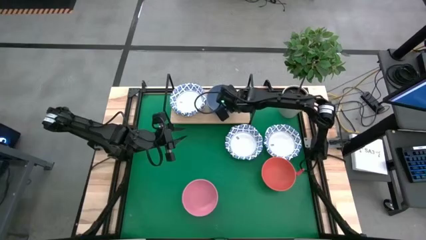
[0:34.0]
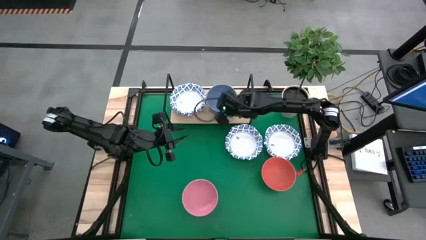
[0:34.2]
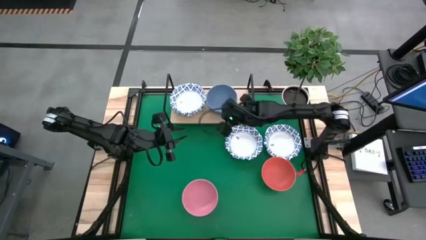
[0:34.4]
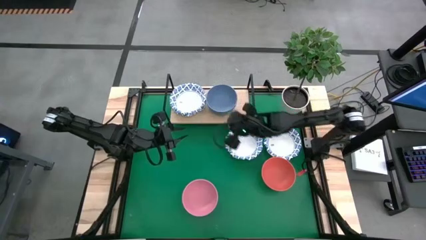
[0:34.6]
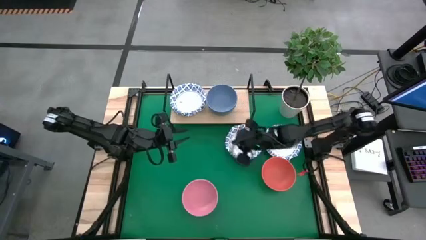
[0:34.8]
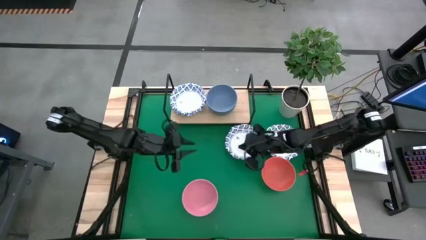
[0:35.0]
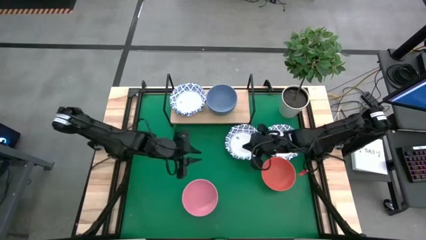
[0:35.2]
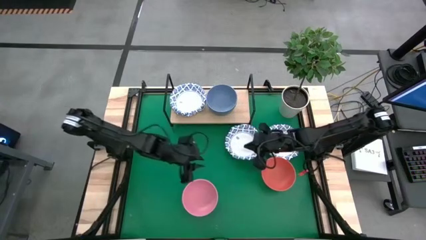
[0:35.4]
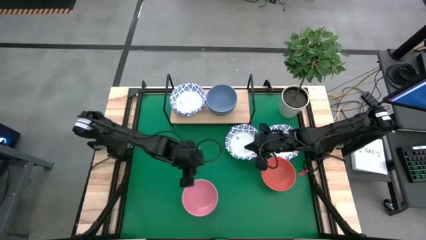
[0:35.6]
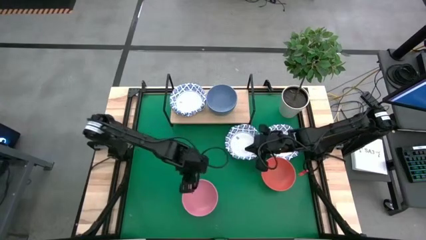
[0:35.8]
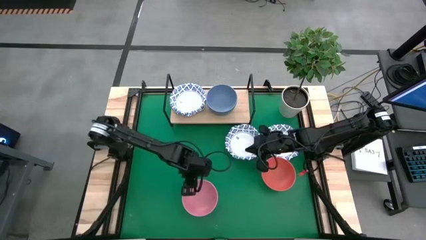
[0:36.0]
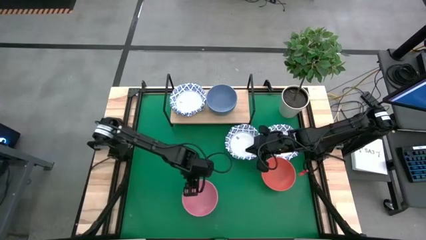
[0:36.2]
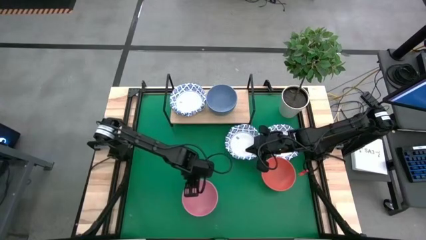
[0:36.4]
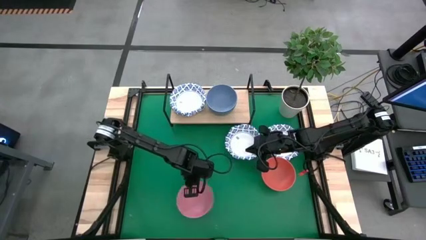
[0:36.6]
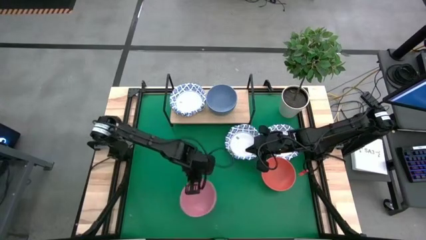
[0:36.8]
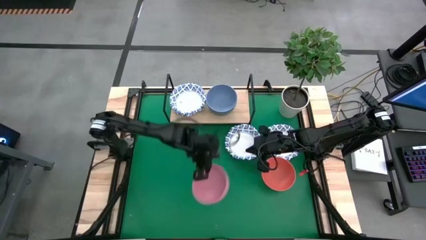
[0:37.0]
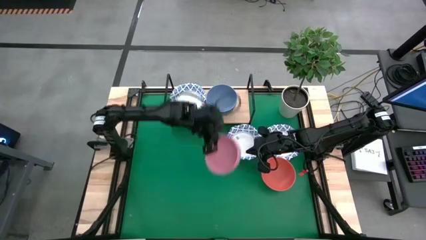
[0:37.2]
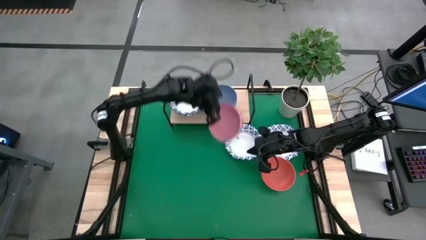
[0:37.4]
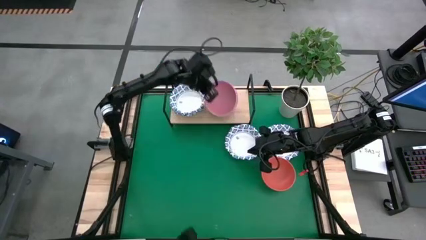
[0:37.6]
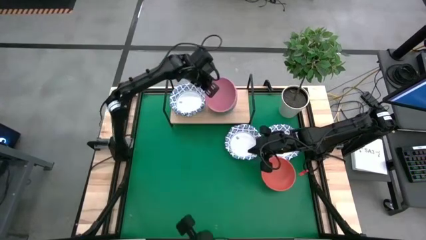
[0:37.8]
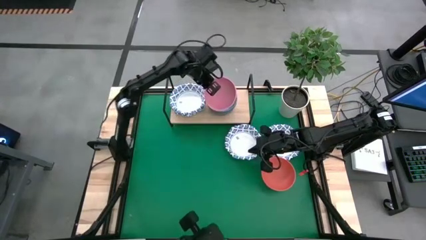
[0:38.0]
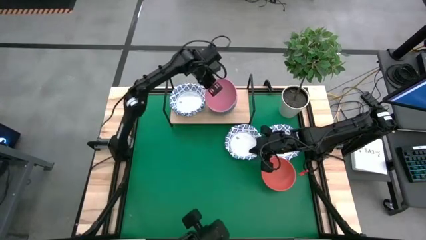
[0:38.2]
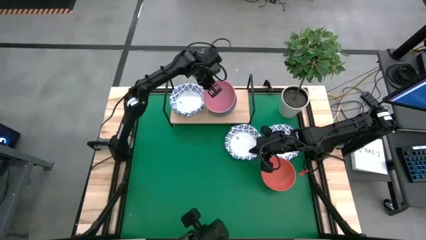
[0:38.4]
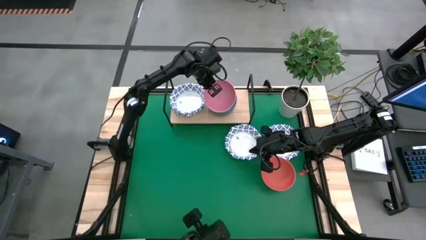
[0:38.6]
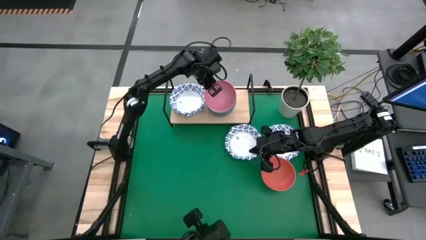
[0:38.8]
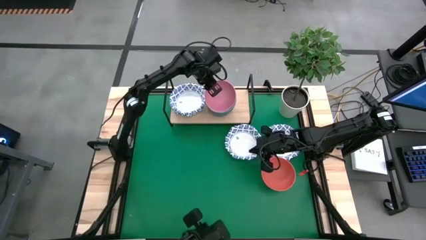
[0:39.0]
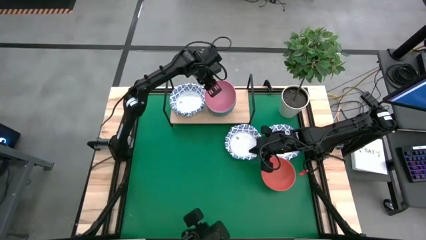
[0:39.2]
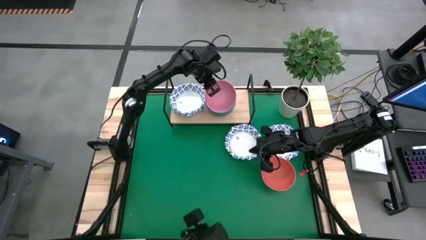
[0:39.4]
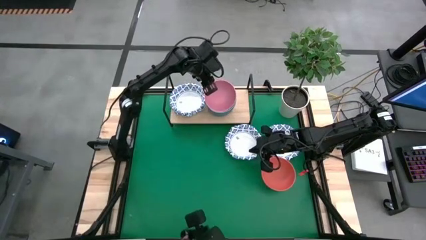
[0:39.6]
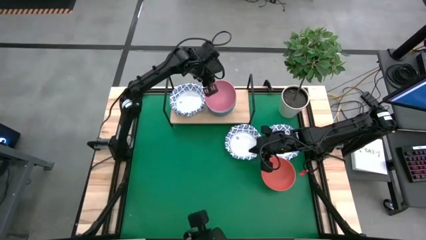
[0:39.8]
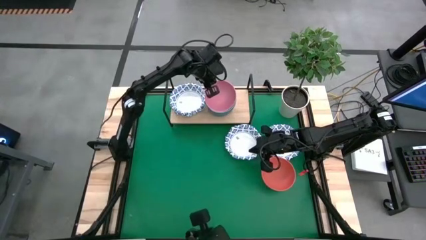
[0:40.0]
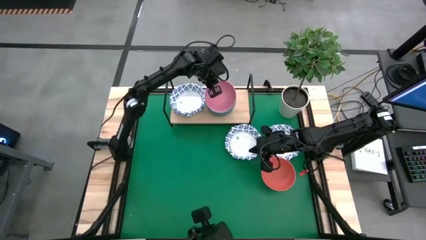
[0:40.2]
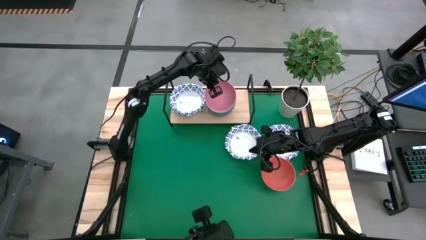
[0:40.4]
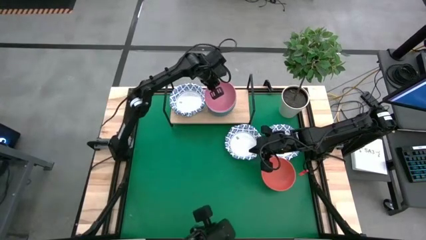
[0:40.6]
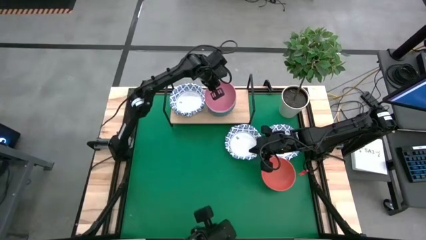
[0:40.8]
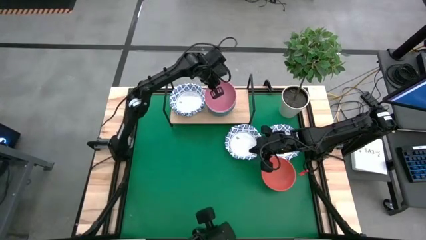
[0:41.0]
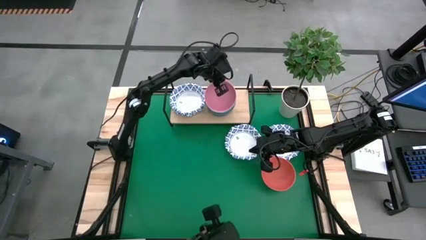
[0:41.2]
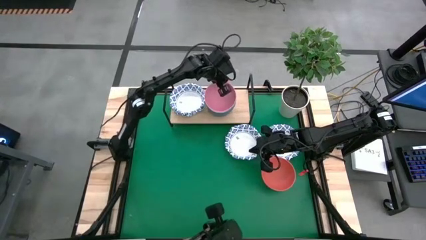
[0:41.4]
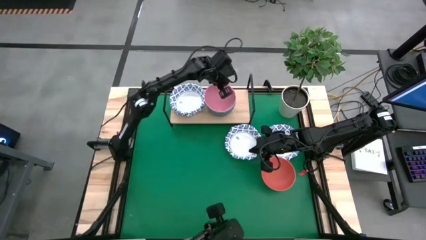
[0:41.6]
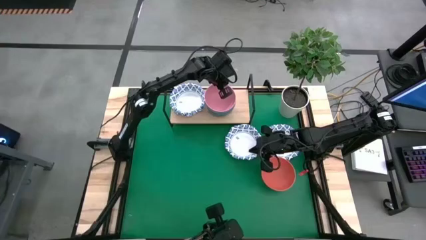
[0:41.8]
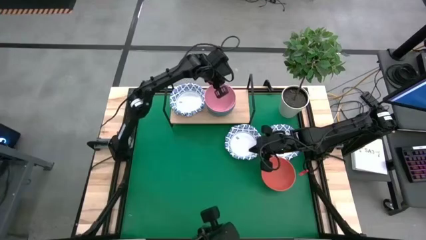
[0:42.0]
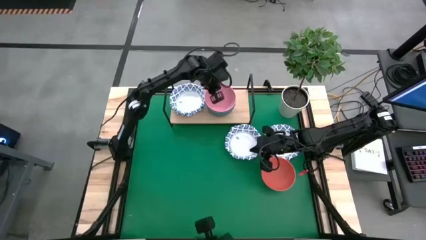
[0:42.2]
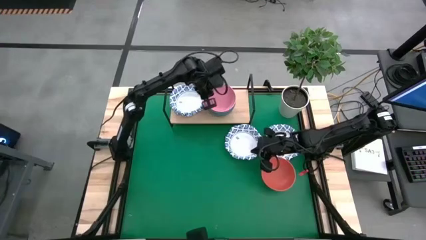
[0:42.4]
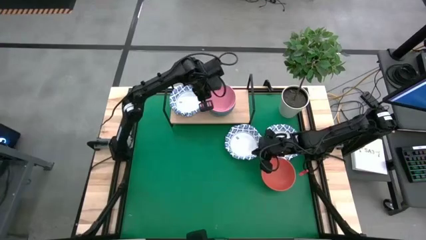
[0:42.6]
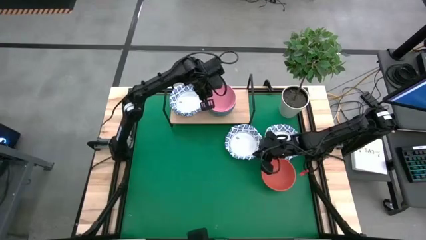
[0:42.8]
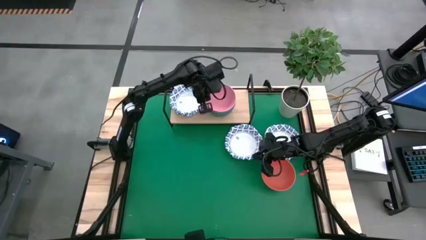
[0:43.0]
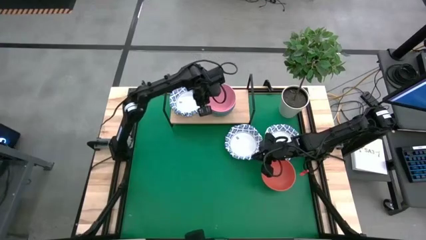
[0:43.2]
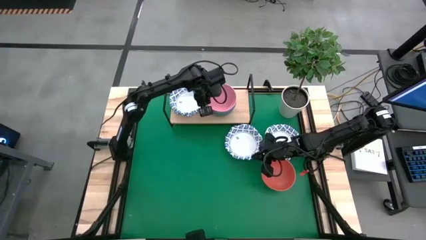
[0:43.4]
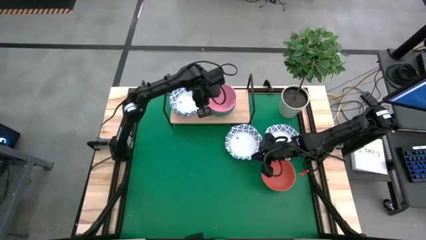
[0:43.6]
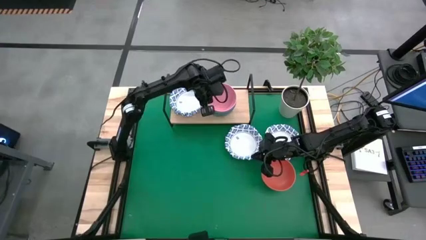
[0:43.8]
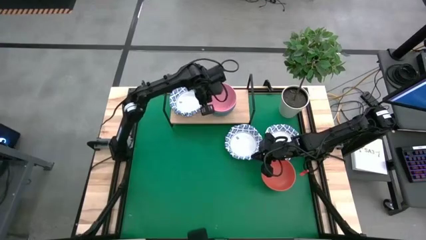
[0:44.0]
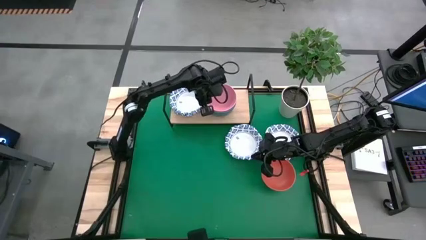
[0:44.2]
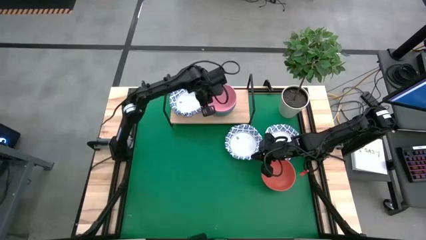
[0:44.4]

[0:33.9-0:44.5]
Task: Place and stack bowls onto a shelf
Stack the pink bowl on top of the blue bowl on the shelf

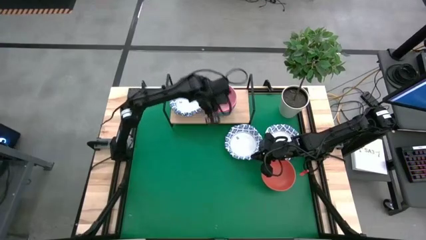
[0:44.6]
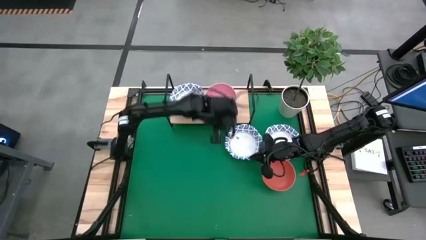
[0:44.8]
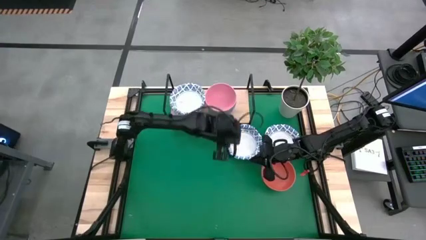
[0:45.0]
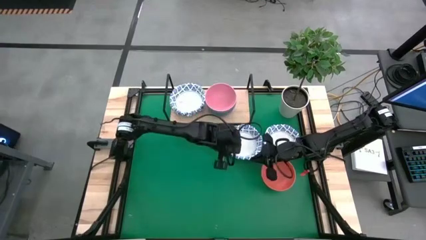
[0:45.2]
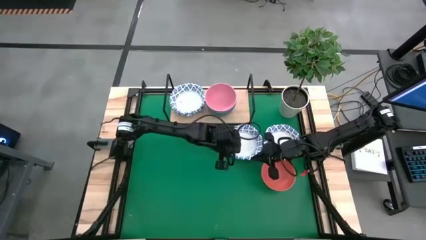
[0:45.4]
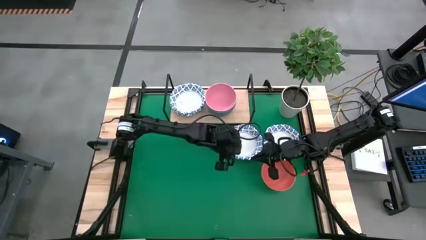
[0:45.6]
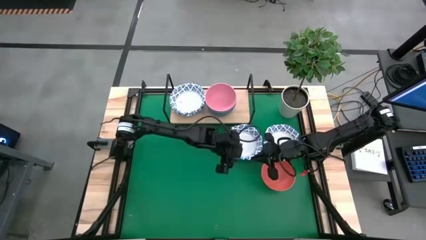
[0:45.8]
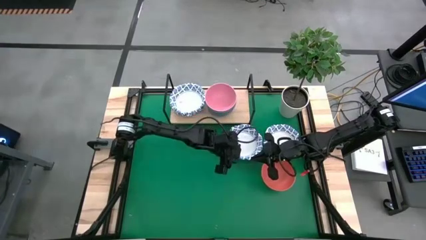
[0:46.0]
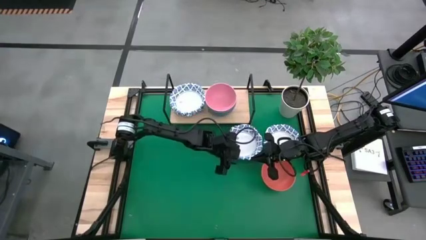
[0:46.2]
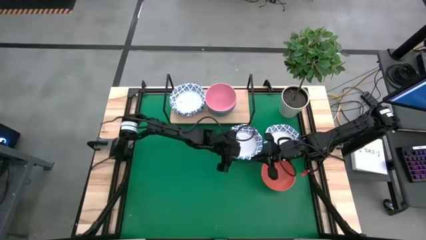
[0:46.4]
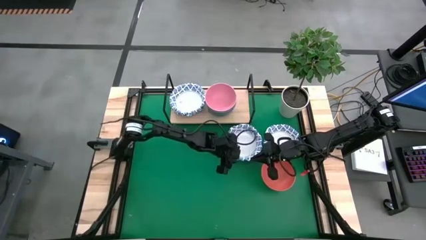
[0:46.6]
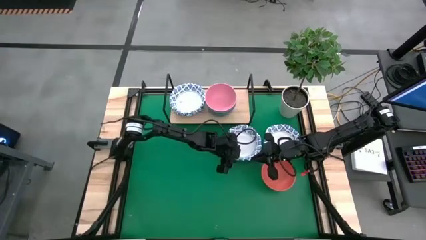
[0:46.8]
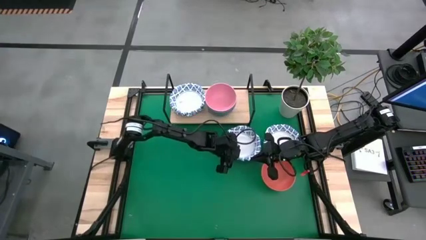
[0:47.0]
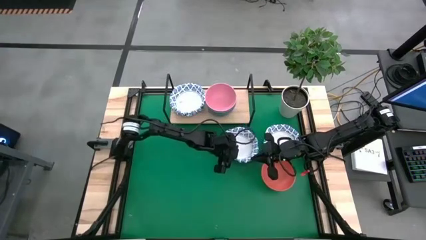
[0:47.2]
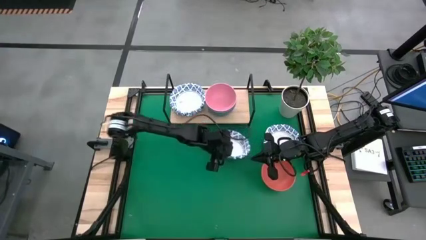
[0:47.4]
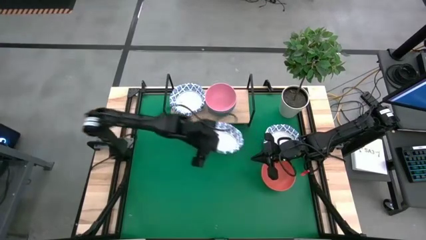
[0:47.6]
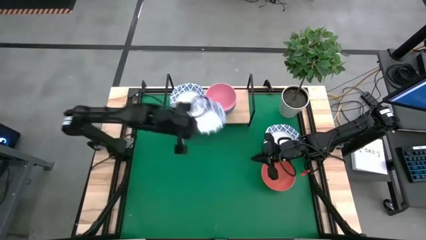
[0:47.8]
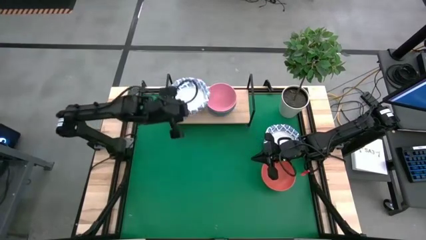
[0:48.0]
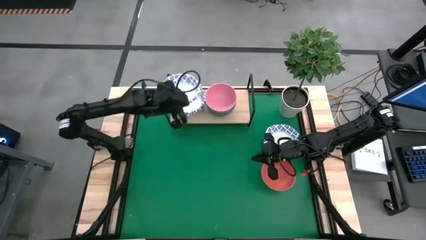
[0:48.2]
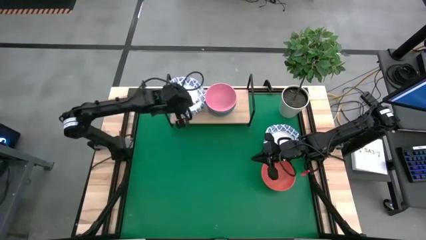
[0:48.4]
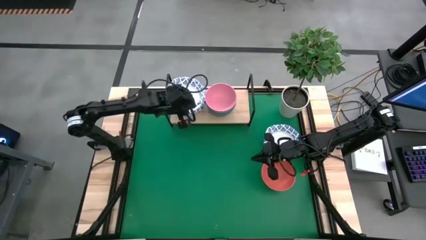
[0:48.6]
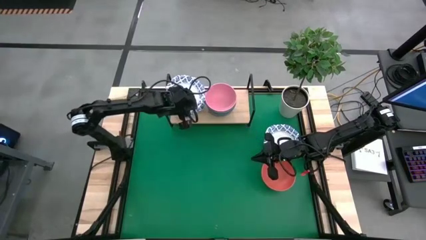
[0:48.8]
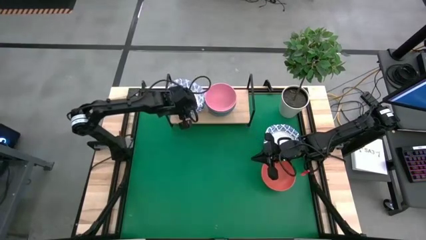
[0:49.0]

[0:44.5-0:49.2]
Stack the white patterned bowl on top of the white patterned bowl on the shelf
